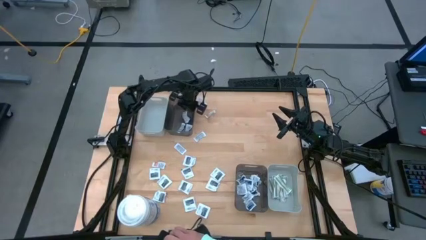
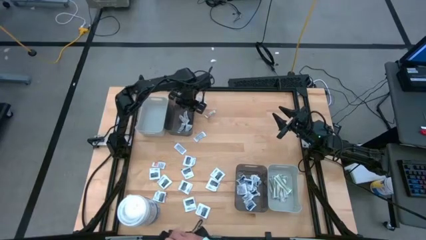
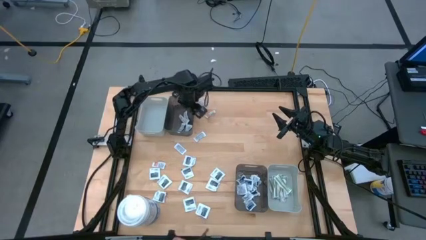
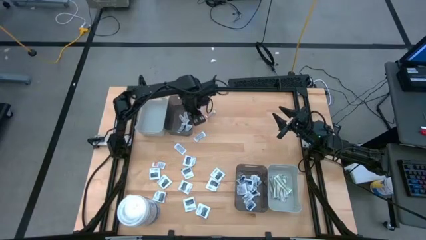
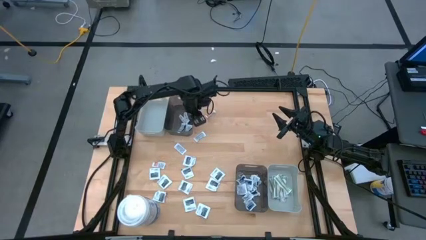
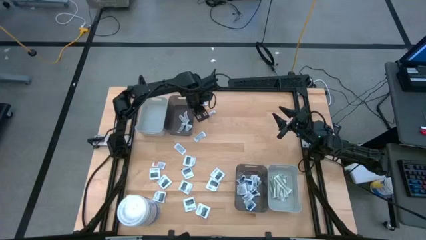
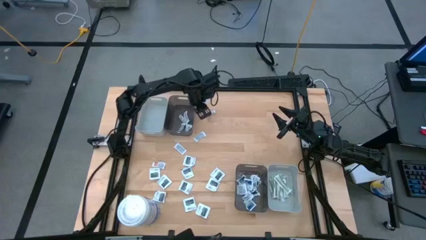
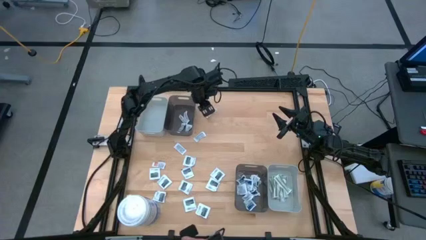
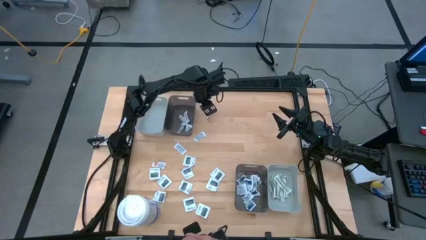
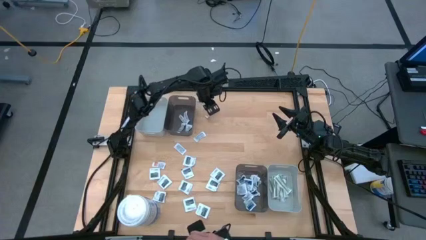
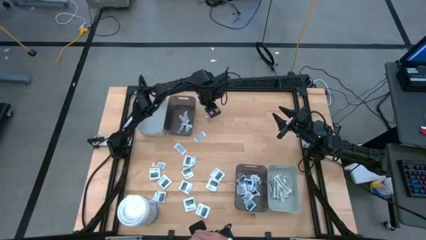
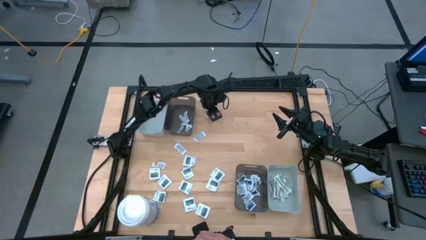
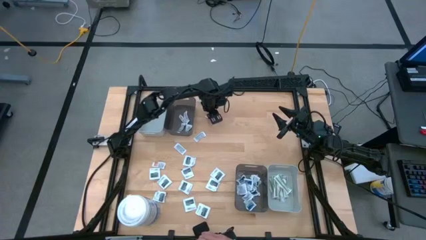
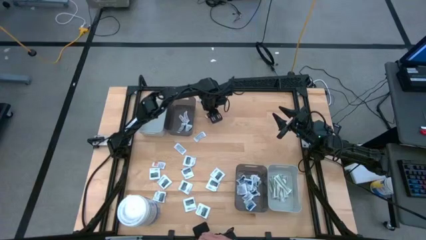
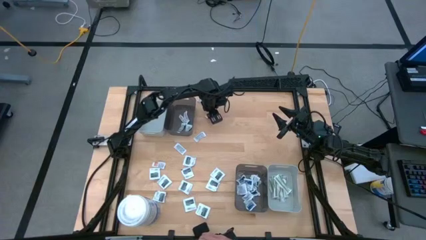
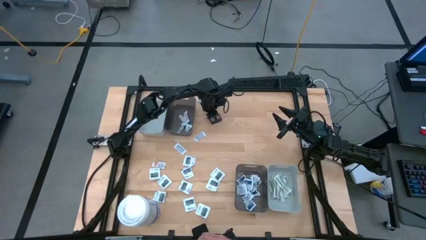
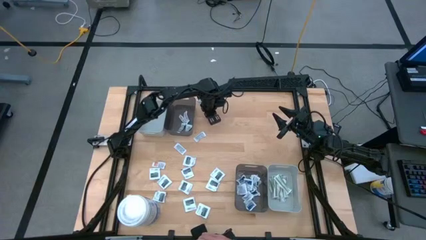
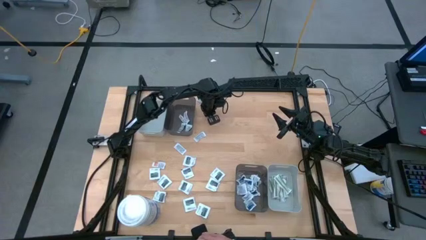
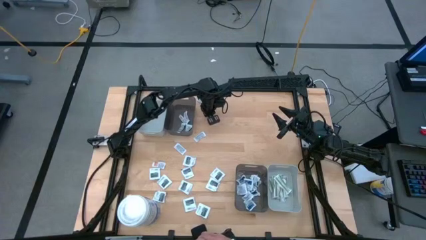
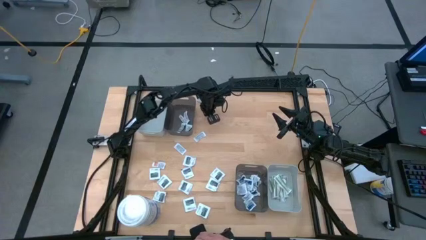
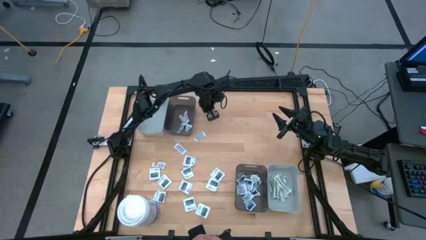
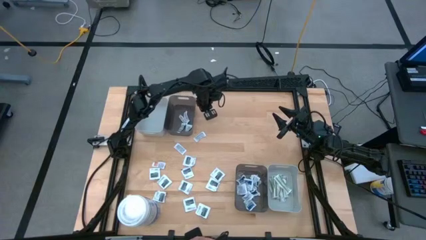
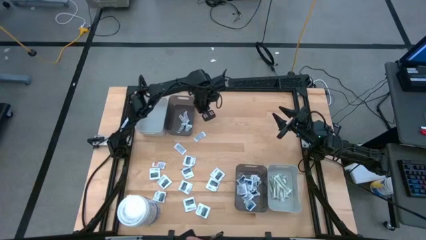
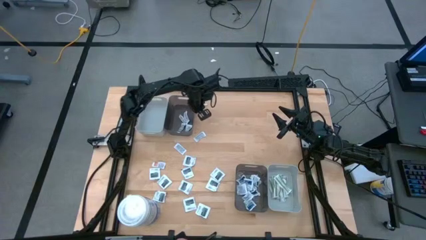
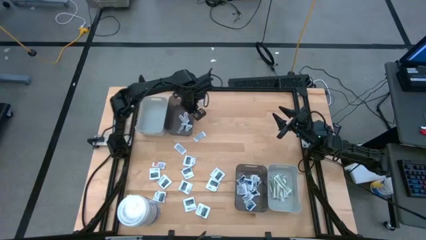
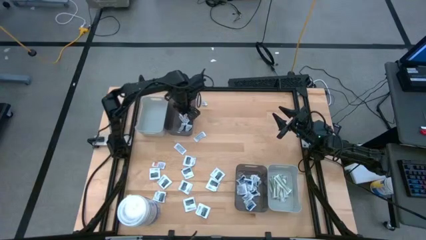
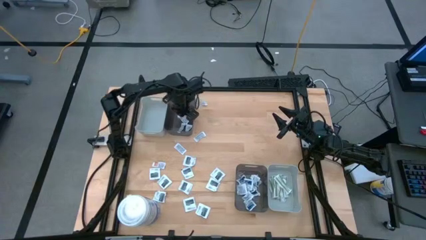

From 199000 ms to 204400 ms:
Task: Pick & Place First Aid Supplies
Put the white ointment pack into the top black bin

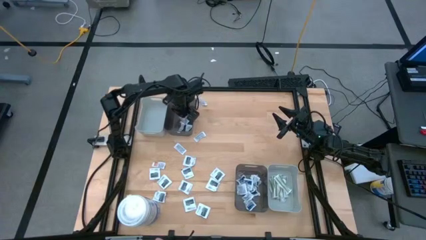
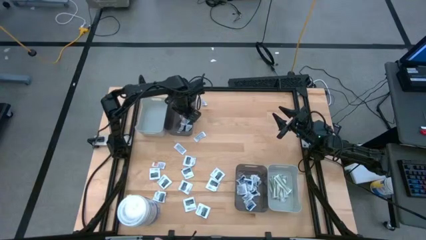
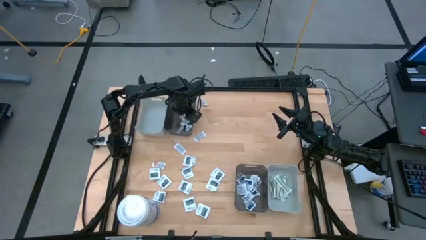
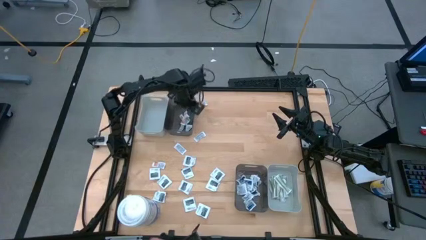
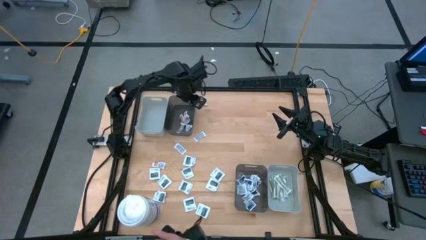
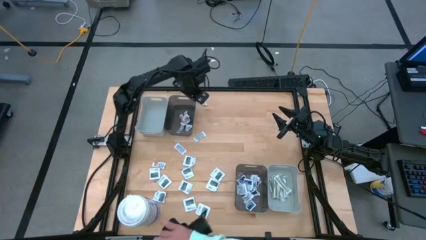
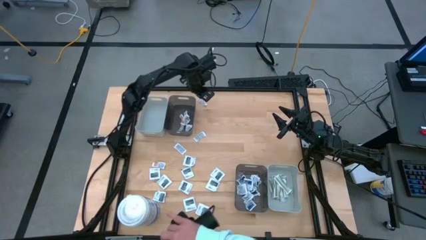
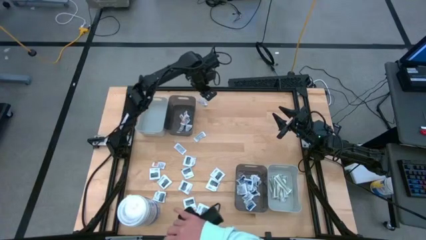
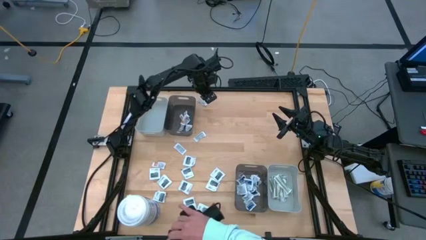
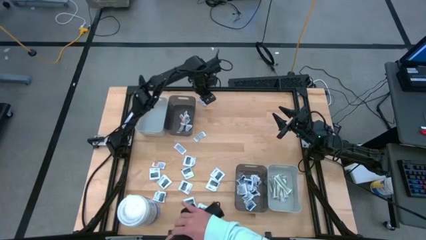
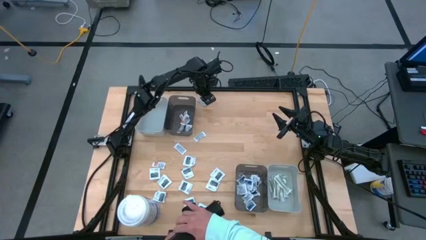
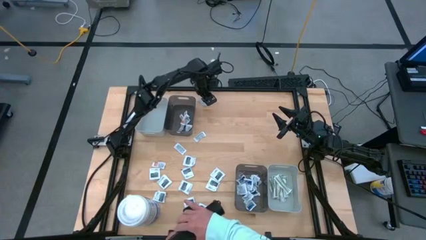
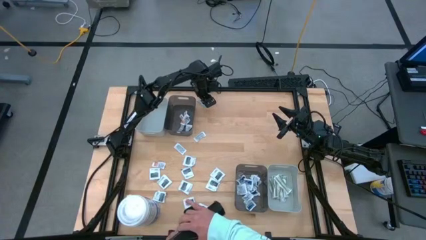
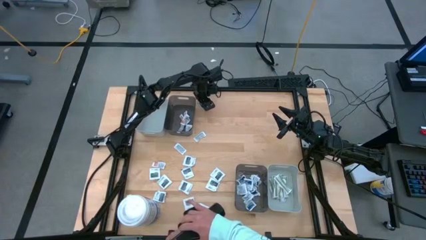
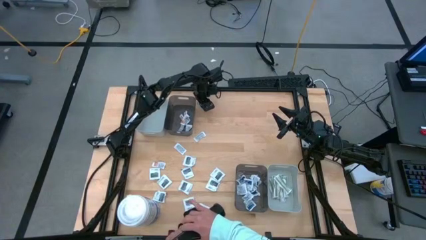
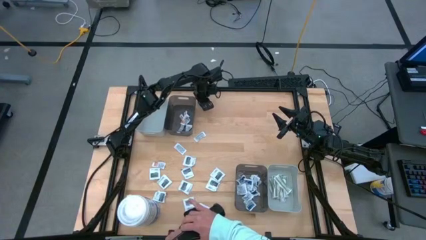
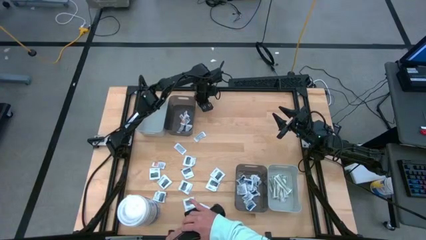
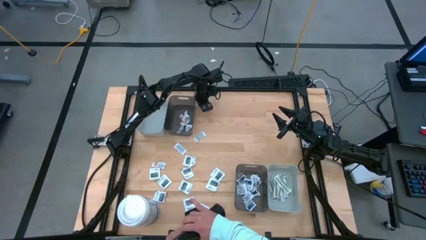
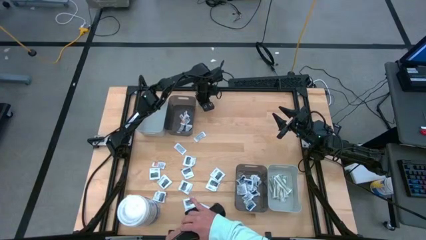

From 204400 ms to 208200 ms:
Put the white ointment pack into the top black bin

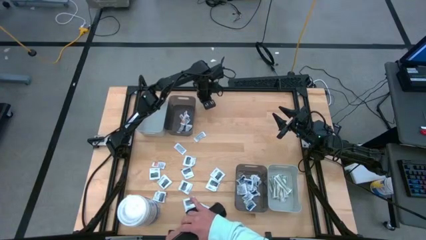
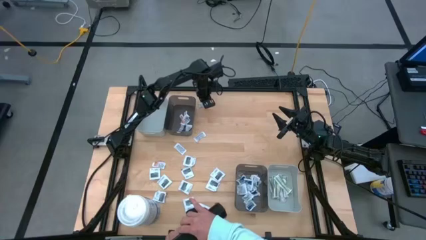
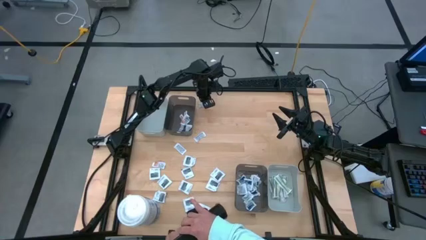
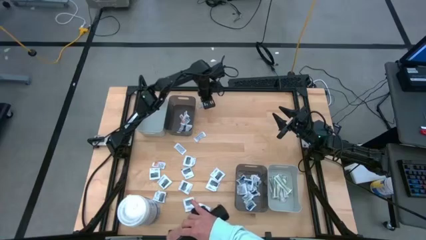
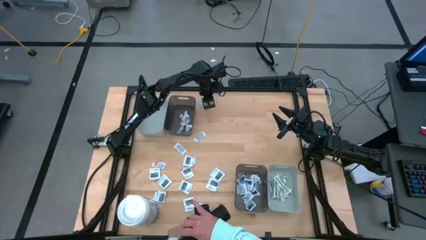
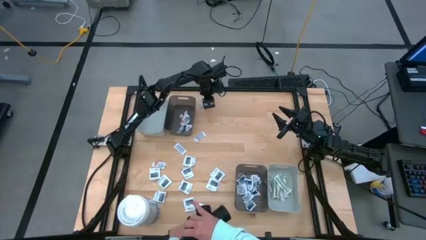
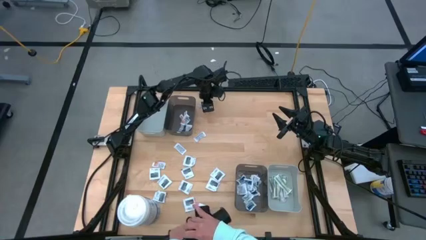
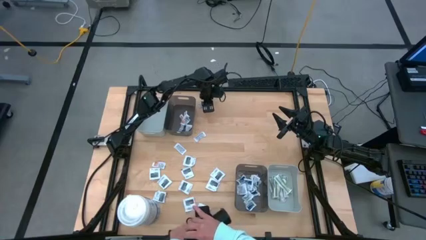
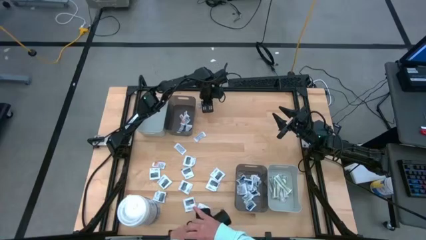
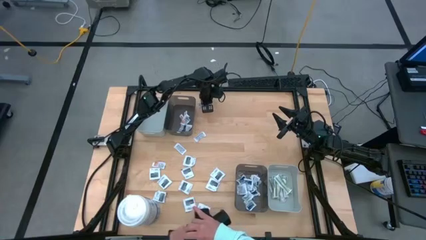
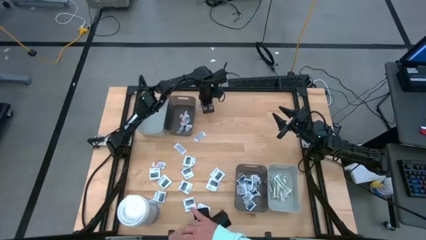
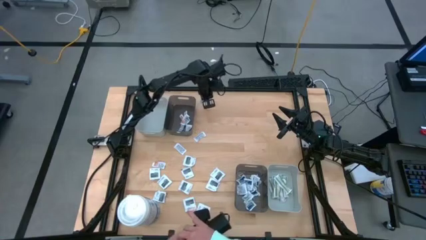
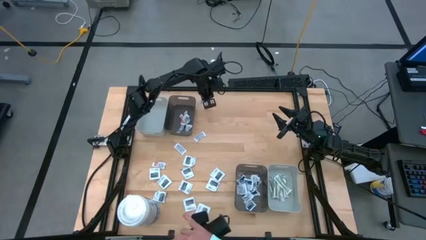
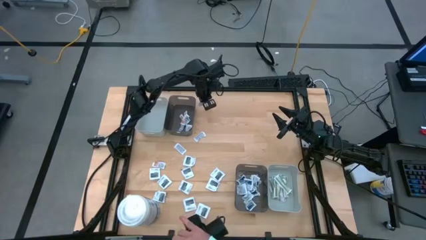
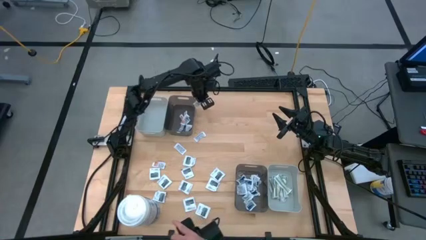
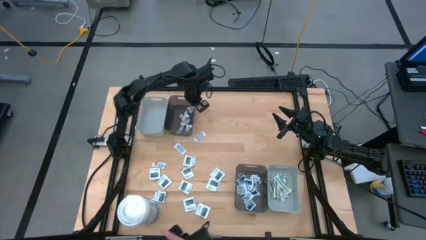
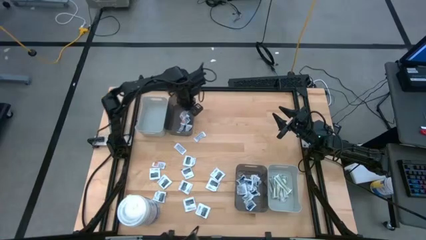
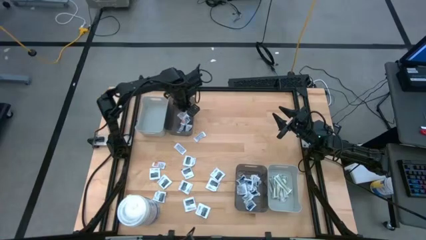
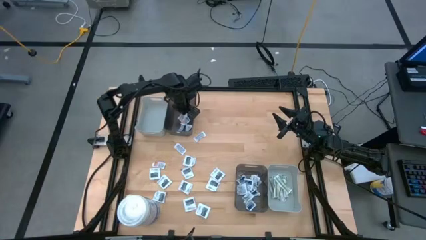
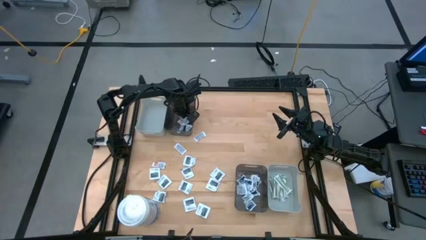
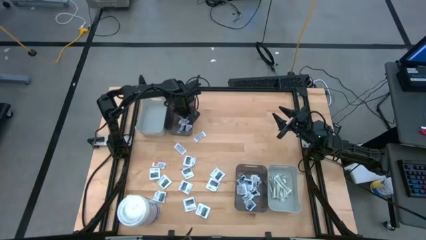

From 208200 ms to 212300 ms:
Put the white ointment pack into the top black bin

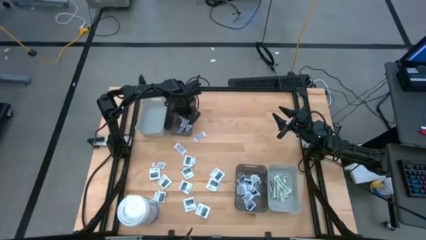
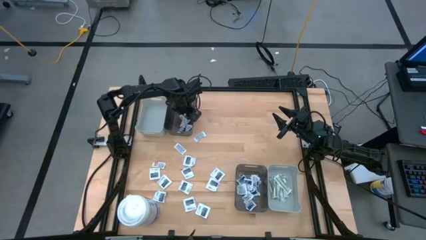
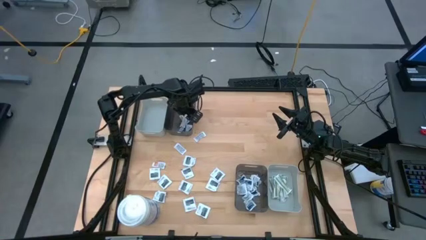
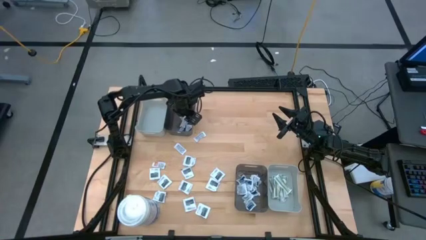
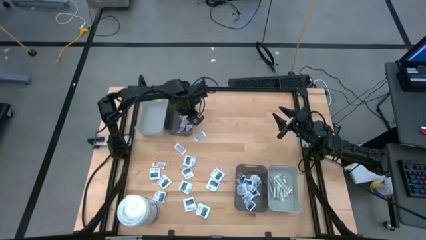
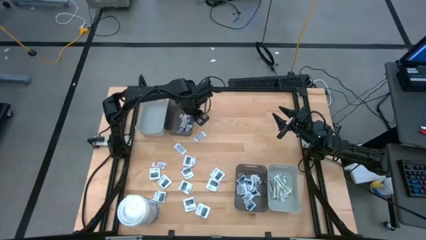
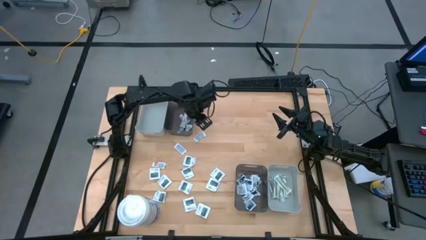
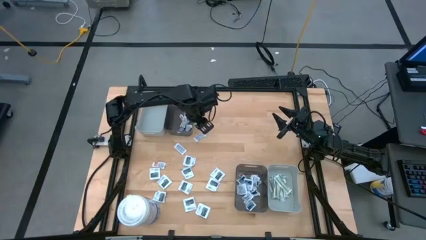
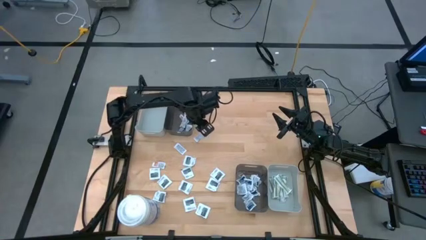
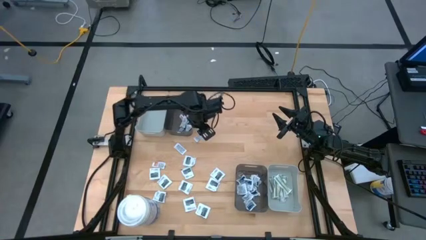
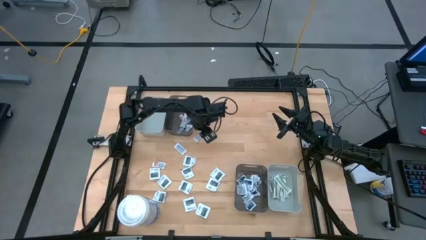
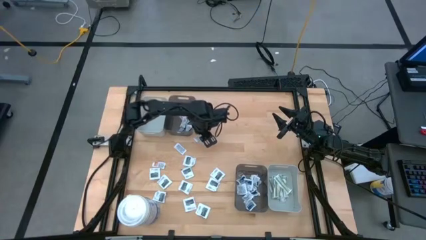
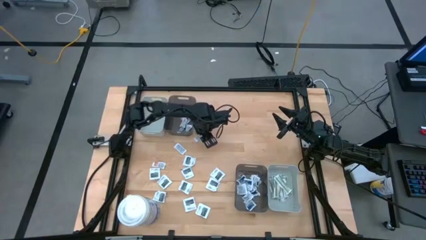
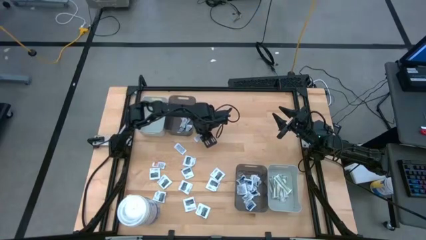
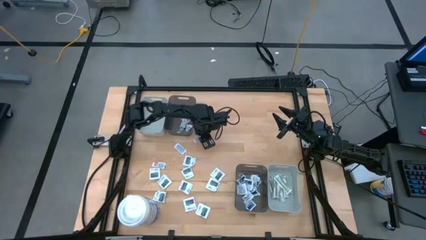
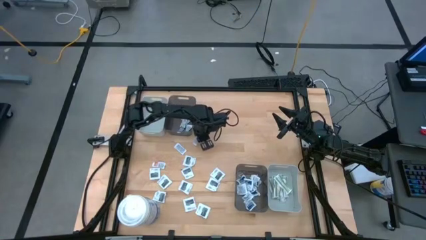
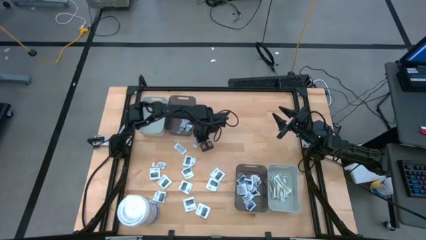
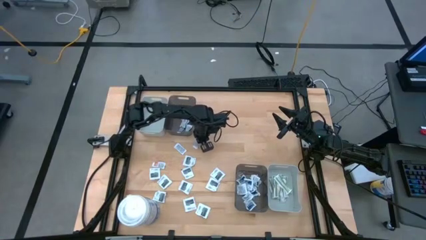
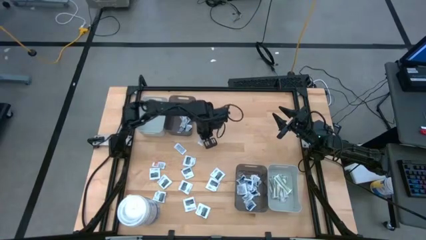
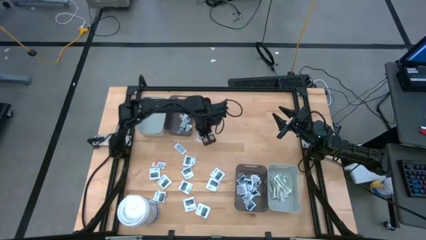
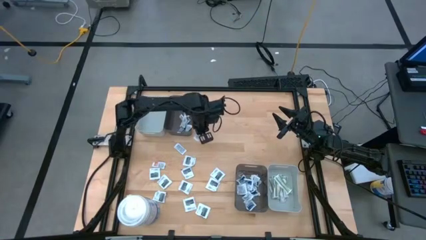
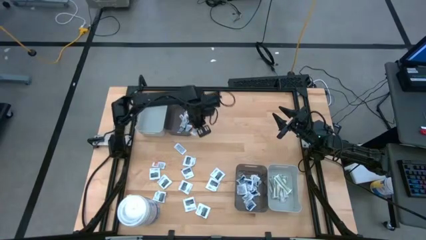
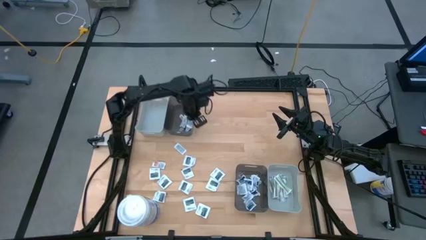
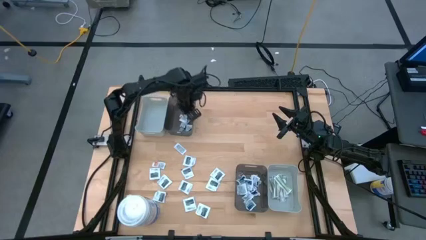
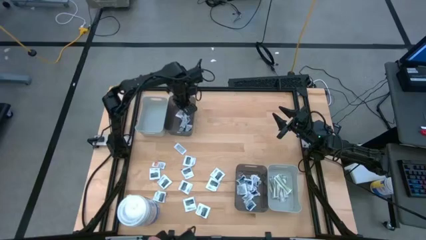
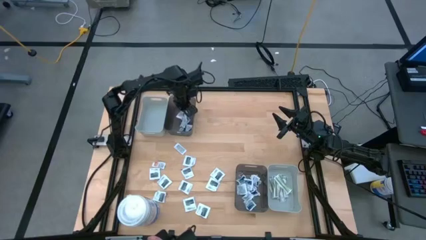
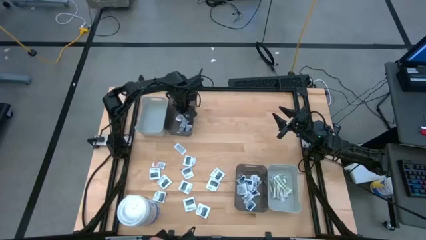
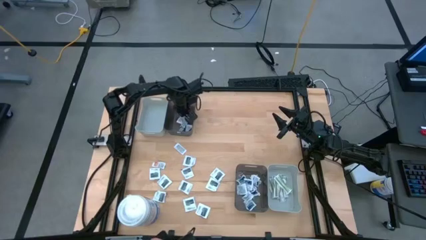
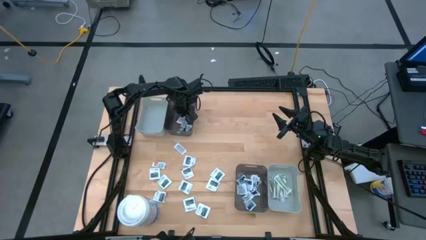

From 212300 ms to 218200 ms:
Put the white ointment pack into the top black bin
